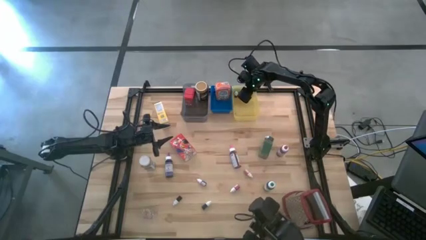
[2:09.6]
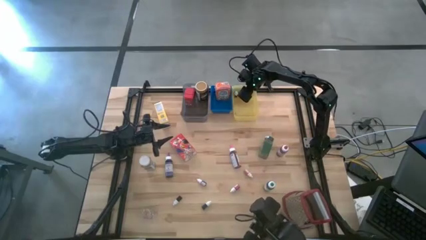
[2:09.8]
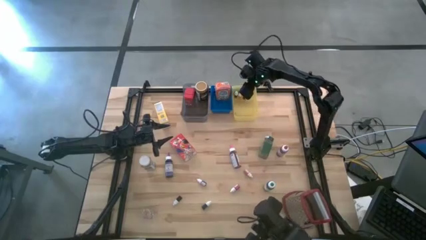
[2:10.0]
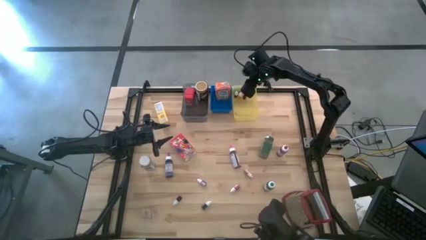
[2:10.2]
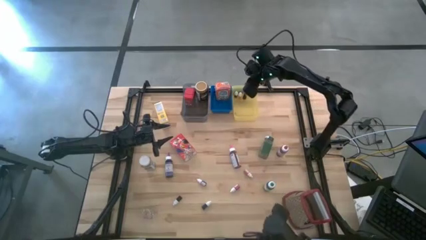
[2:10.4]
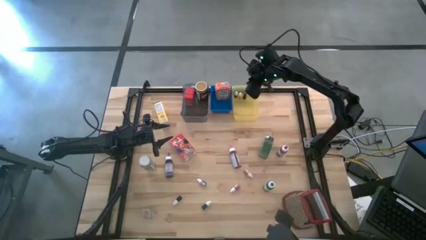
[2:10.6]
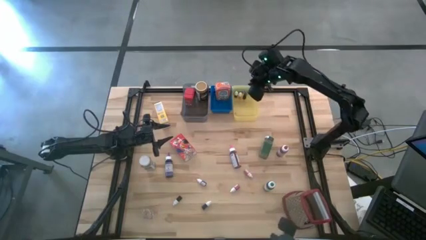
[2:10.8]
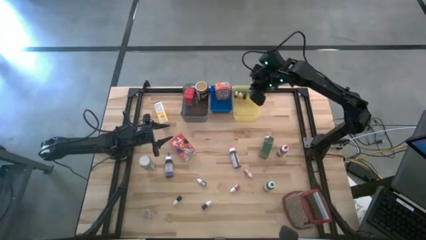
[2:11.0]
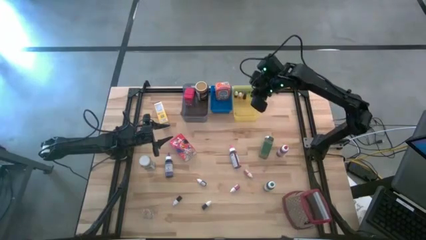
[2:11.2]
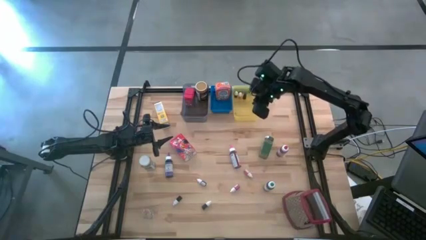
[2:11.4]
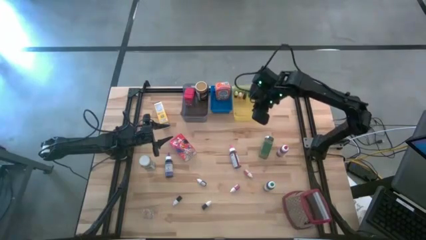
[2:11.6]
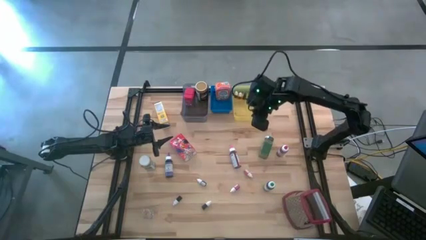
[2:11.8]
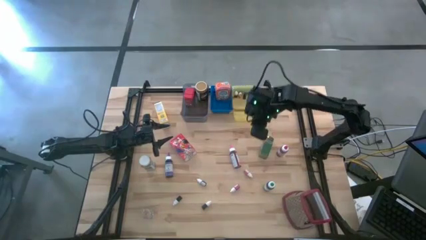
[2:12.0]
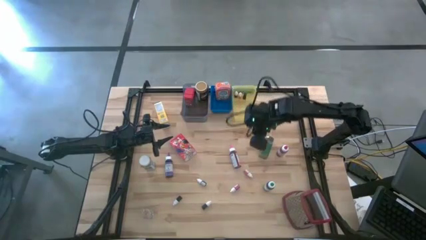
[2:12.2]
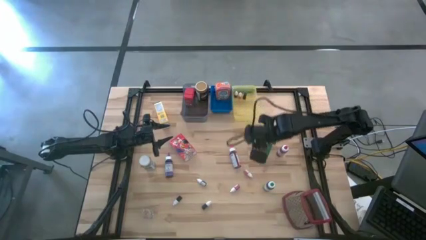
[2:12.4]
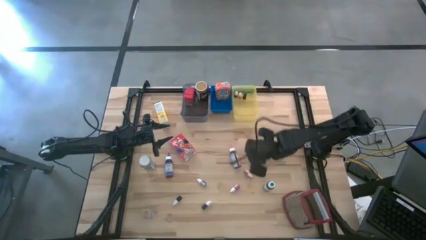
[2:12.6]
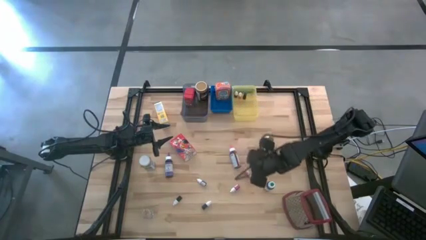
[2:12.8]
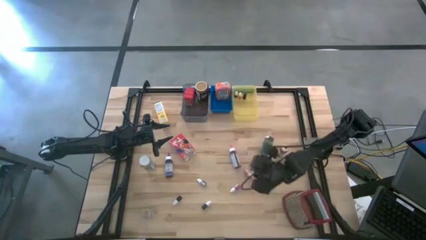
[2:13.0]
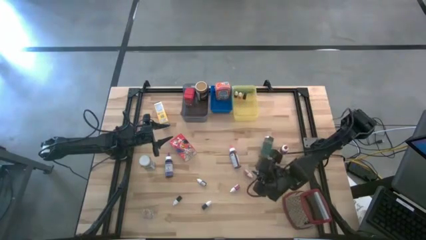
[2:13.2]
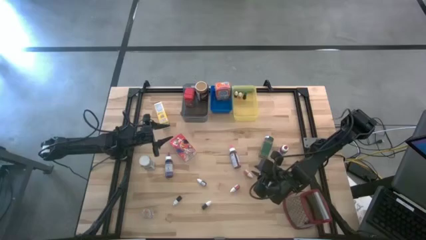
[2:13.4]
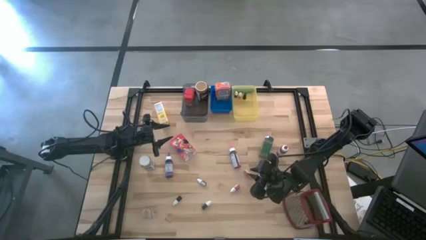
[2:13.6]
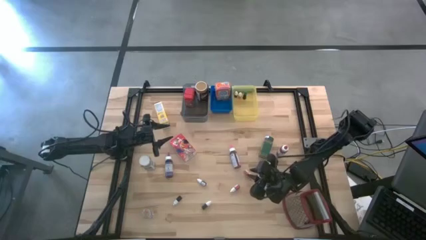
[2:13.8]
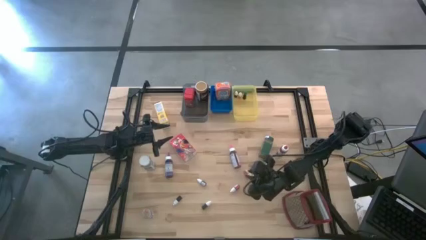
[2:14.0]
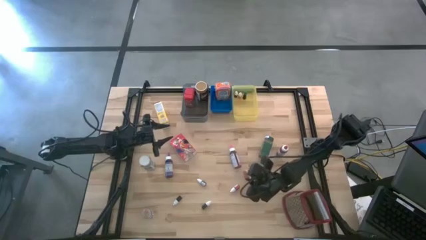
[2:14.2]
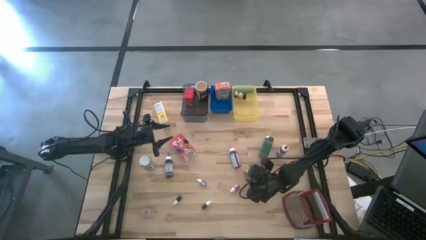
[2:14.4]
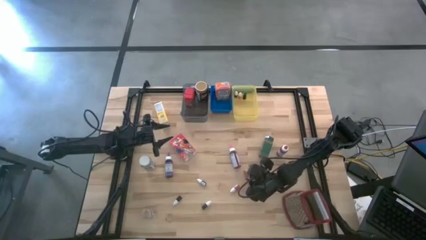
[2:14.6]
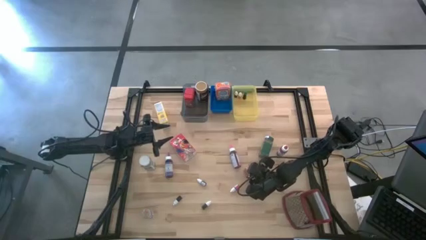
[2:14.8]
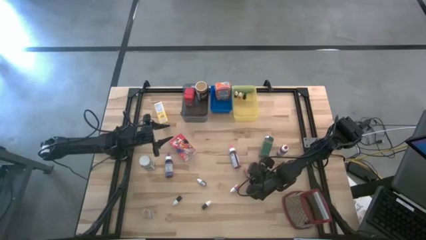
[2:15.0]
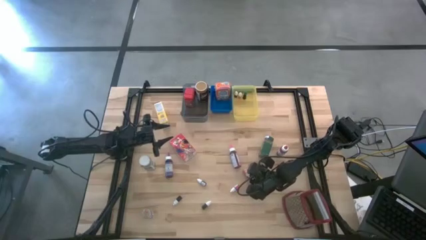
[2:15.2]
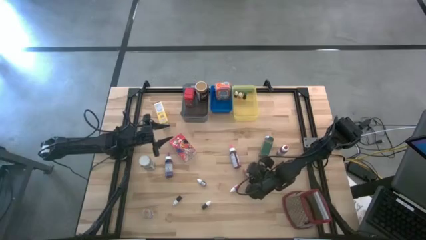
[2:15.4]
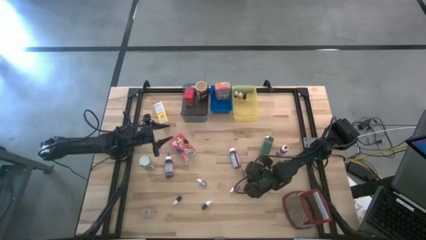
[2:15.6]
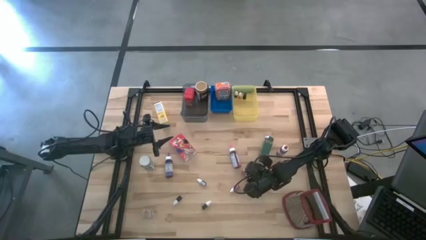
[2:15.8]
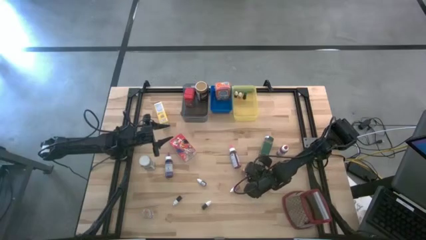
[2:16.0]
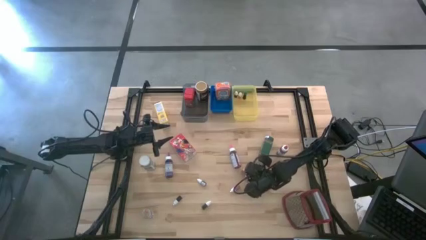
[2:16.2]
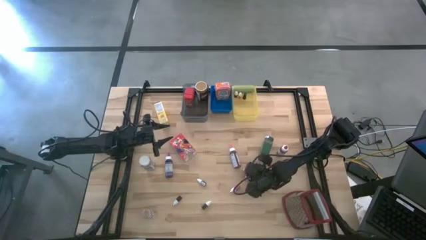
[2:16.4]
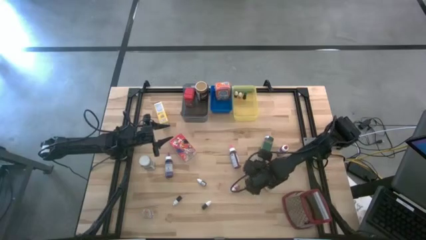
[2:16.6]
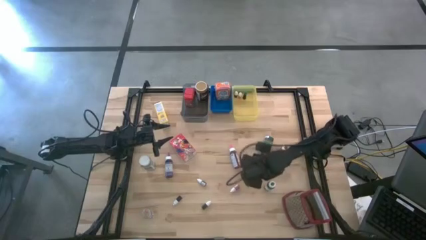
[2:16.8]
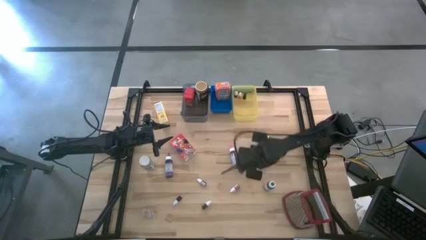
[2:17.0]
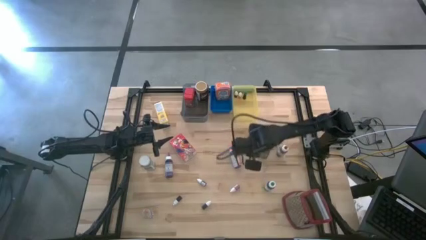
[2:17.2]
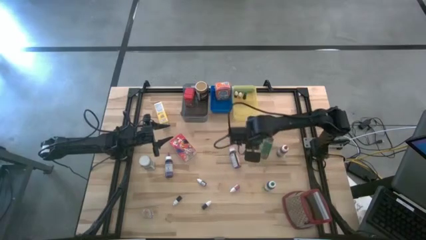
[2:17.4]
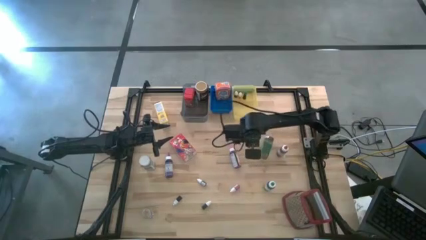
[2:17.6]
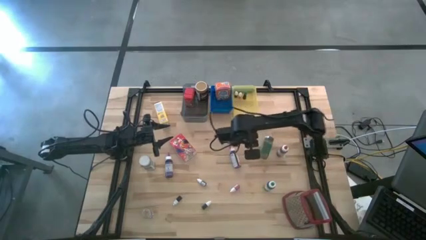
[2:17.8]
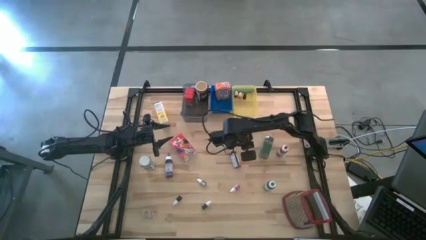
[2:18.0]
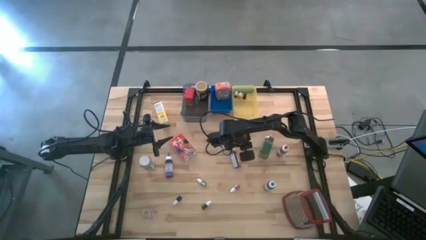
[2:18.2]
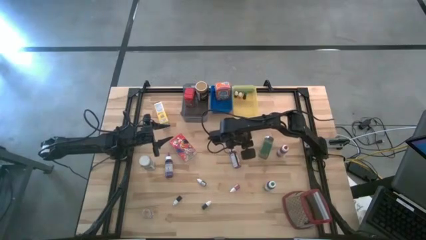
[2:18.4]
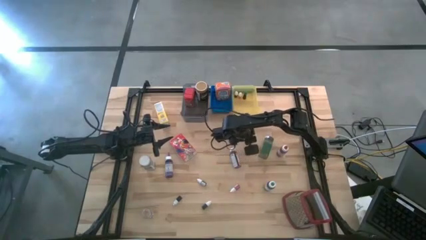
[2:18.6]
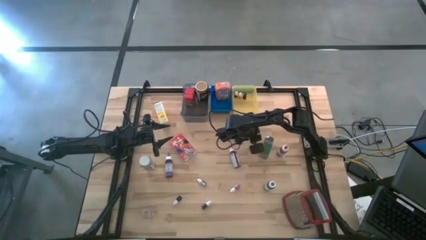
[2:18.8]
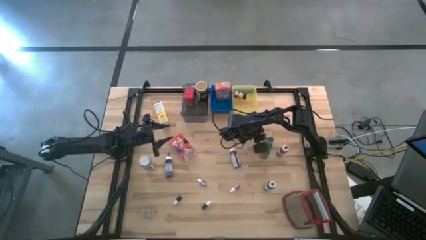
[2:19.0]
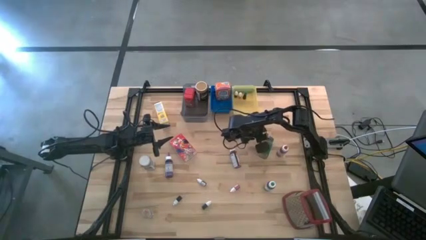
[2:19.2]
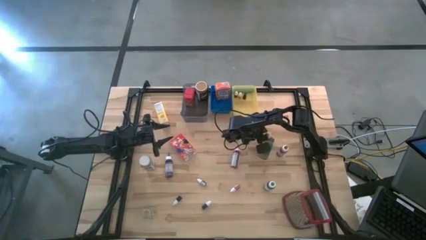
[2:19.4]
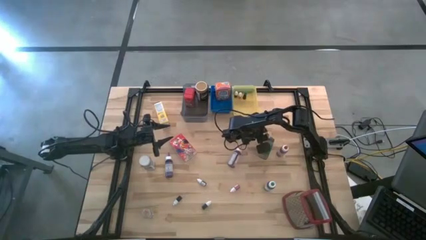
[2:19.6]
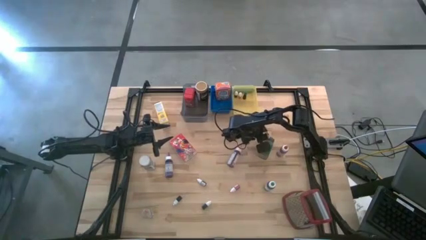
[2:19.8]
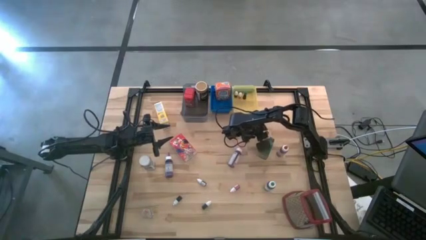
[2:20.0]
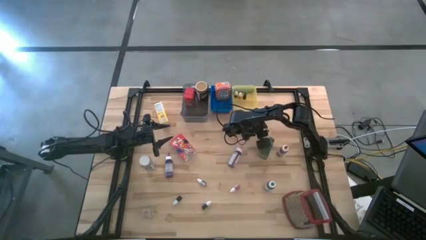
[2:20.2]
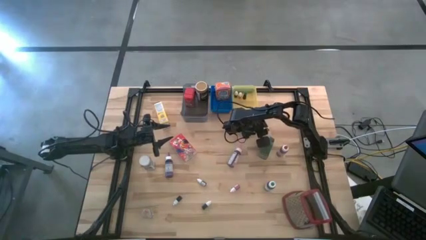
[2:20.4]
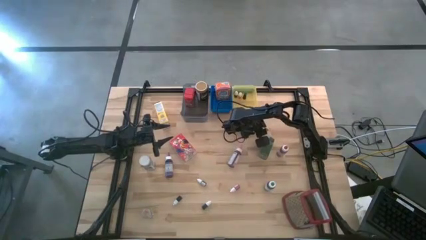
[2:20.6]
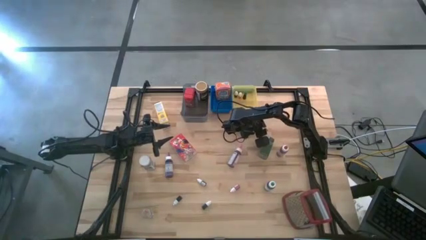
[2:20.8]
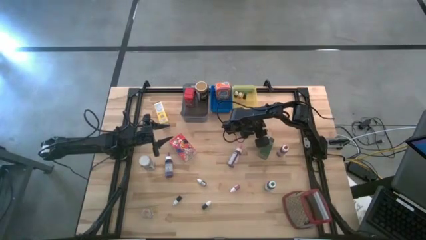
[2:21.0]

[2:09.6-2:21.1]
Task: Pick & Place Kitchen Items
Move the orange food coloring bottle to the top right of the table

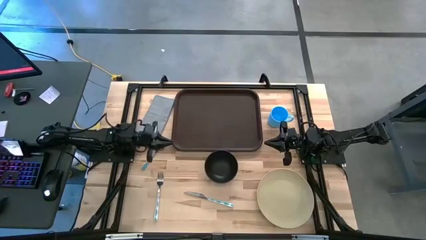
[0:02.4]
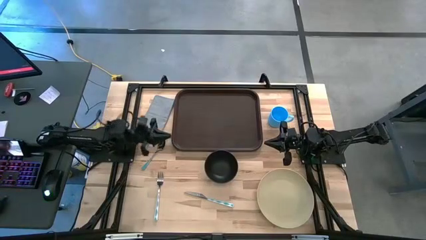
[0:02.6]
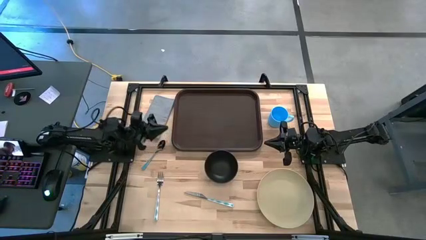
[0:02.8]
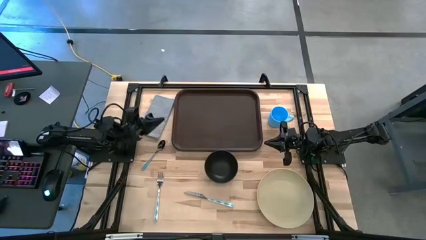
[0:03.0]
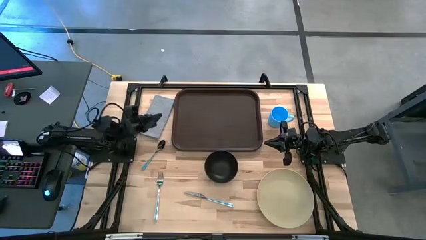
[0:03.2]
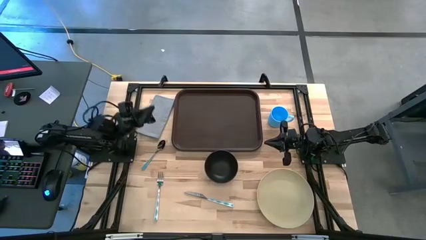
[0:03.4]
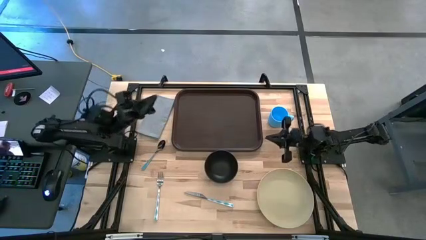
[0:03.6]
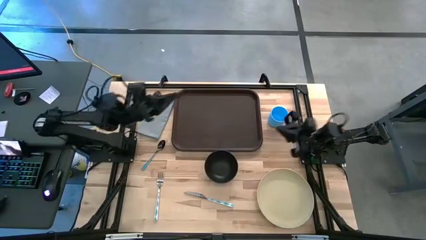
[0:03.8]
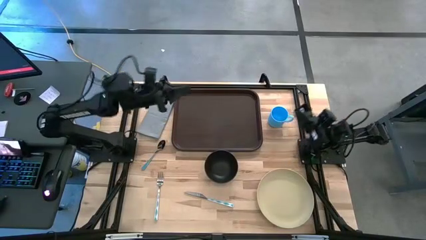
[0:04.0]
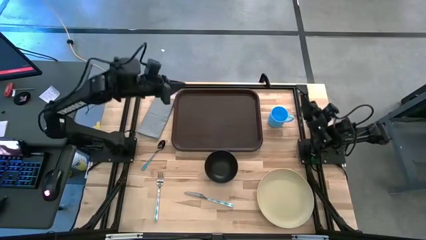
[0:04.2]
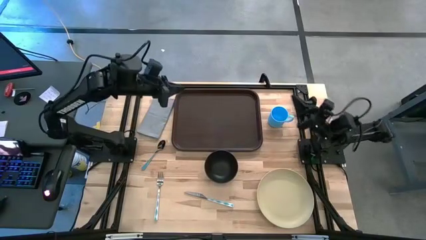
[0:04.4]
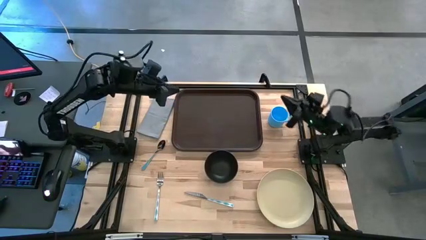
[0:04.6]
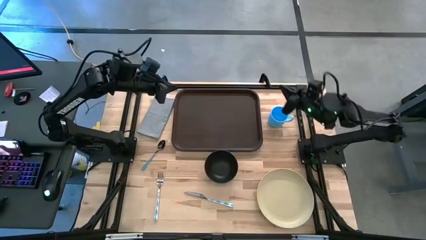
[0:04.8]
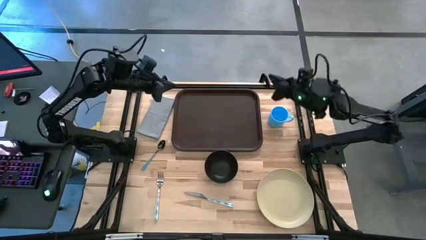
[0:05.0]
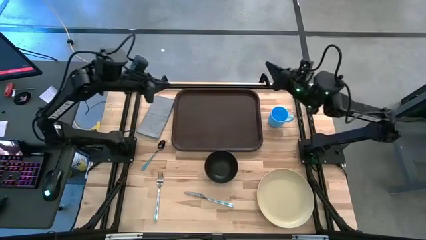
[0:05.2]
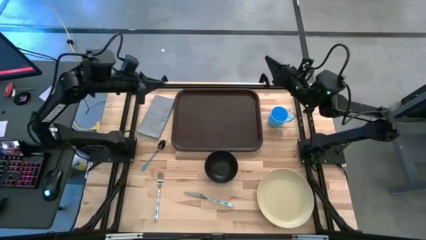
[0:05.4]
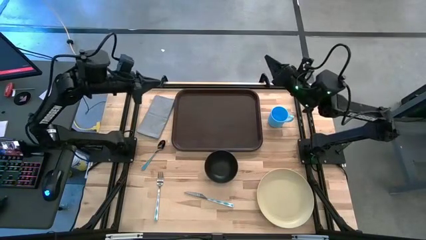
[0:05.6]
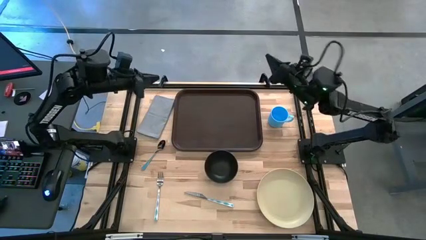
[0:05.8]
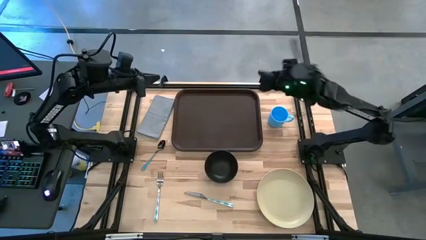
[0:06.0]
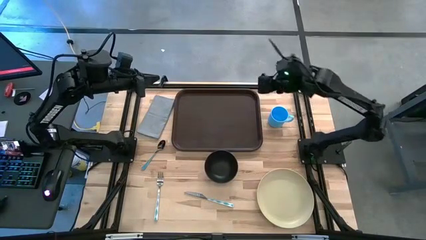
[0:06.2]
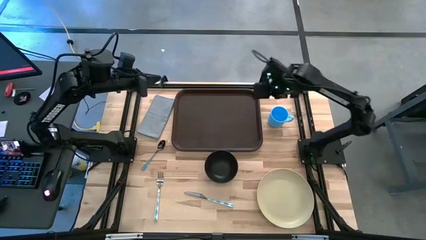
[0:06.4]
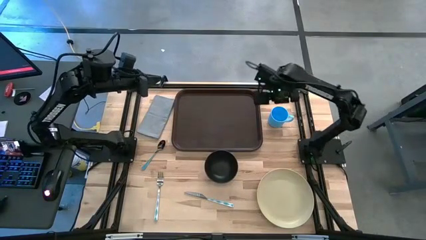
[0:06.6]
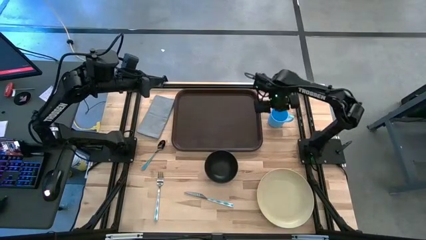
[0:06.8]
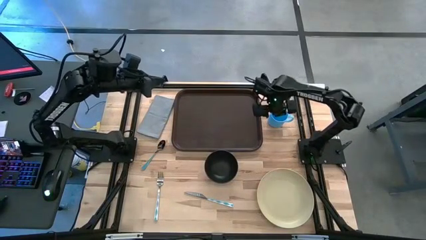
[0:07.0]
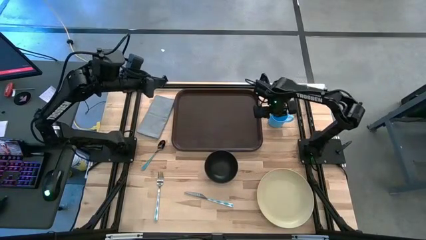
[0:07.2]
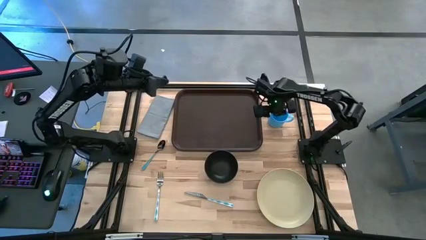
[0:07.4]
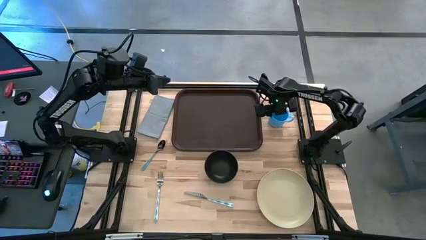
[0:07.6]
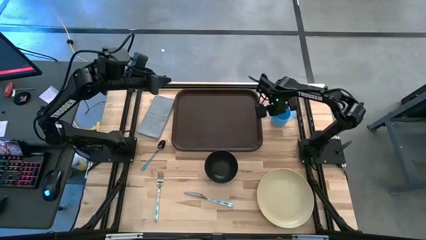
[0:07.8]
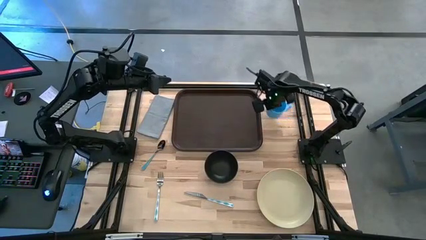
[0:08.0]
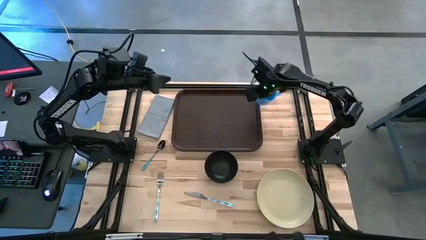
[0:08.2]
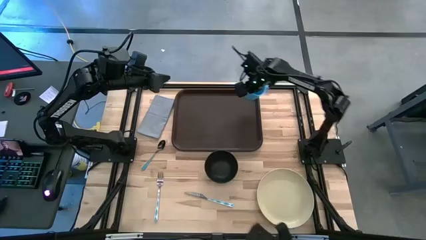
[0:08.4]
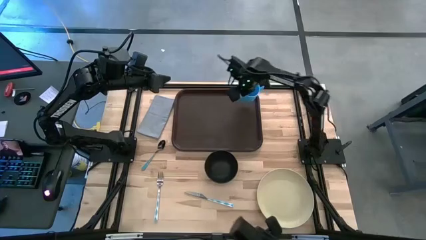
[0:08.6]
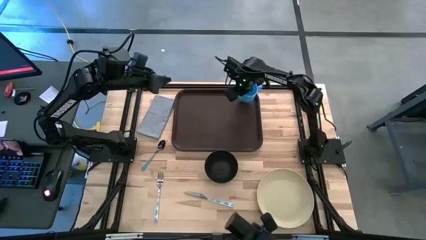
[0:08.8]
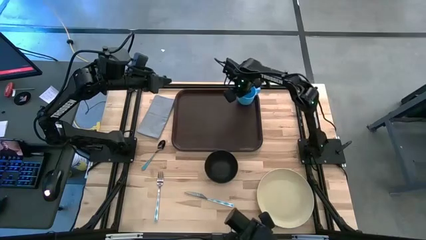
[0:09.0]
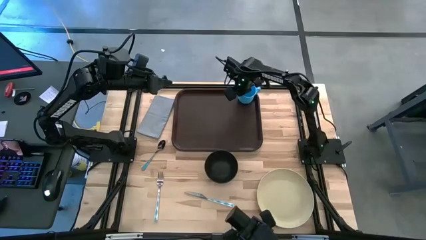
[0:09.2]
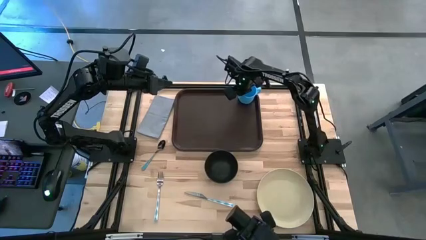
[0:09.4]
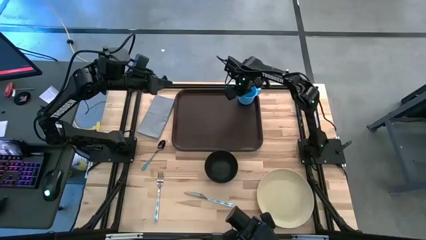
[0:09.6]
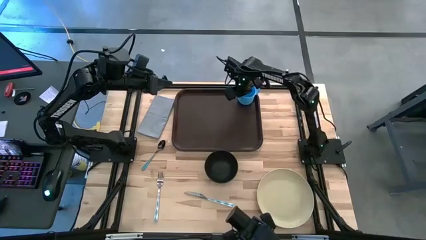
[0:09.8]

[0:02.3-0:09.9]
Task: Set up tray
Put the blue cup on the brown tray
